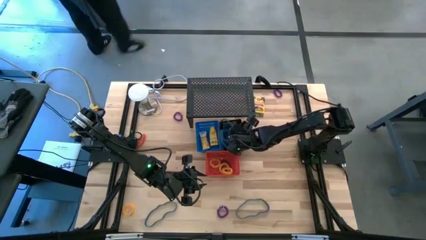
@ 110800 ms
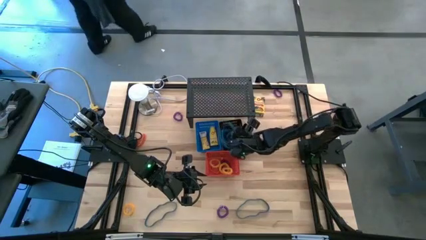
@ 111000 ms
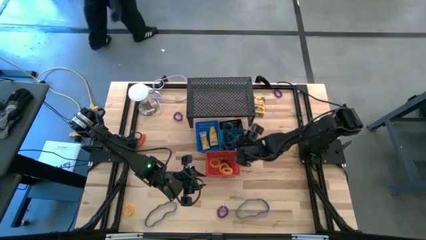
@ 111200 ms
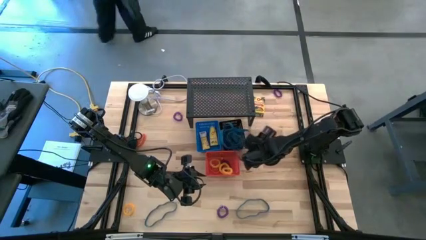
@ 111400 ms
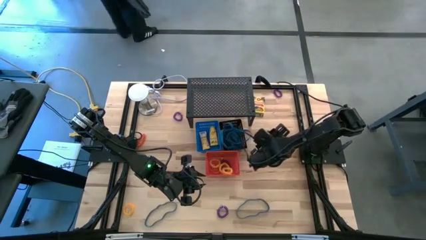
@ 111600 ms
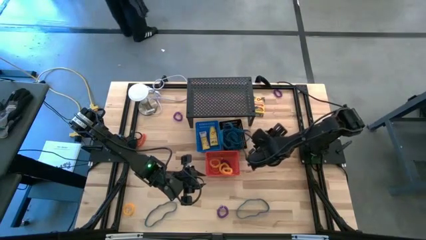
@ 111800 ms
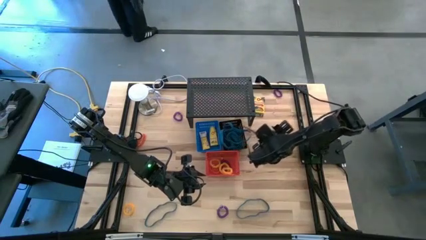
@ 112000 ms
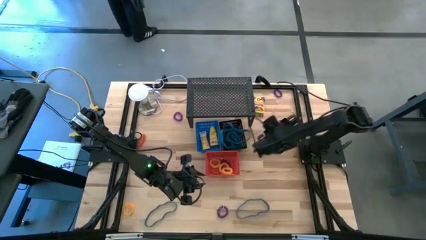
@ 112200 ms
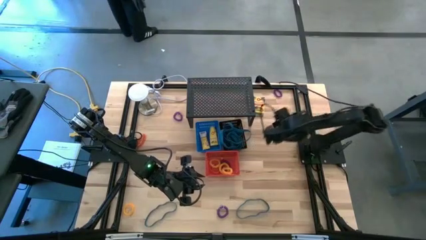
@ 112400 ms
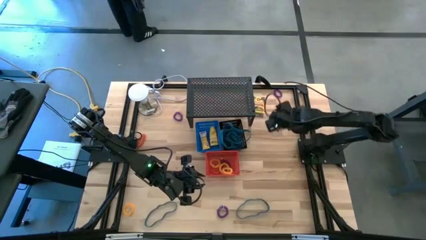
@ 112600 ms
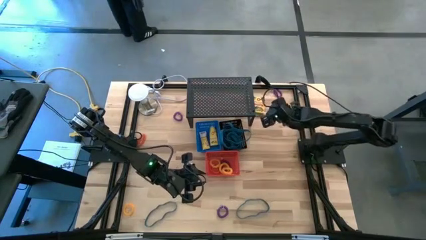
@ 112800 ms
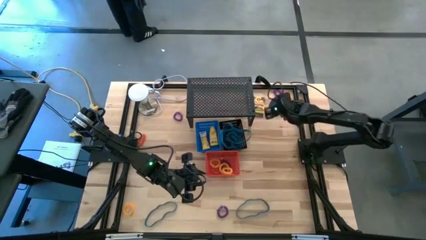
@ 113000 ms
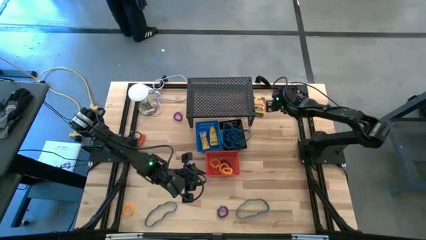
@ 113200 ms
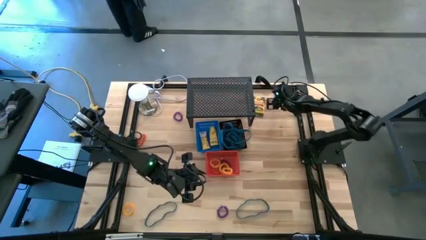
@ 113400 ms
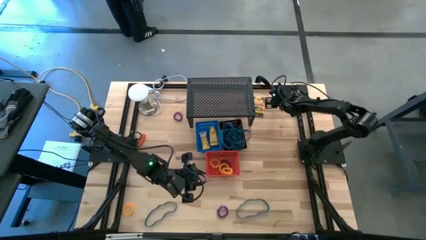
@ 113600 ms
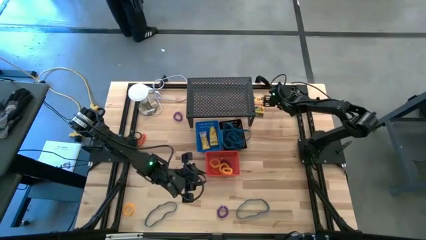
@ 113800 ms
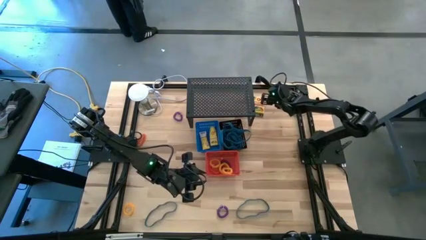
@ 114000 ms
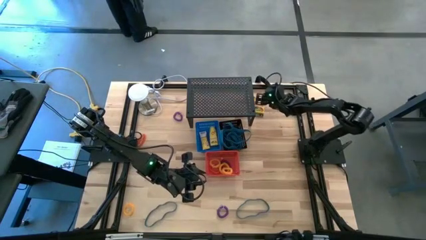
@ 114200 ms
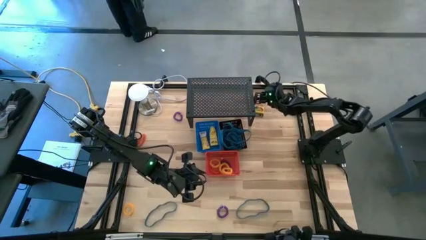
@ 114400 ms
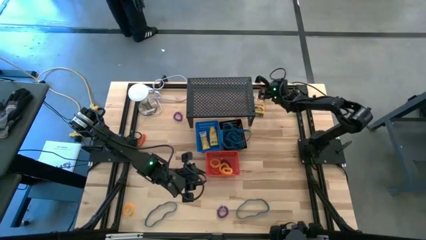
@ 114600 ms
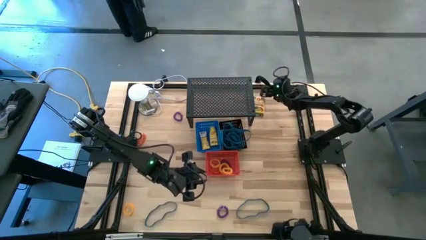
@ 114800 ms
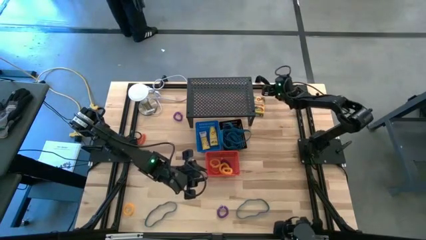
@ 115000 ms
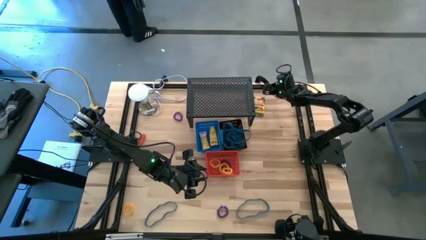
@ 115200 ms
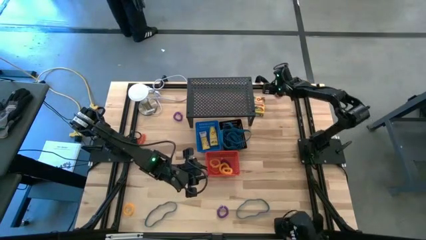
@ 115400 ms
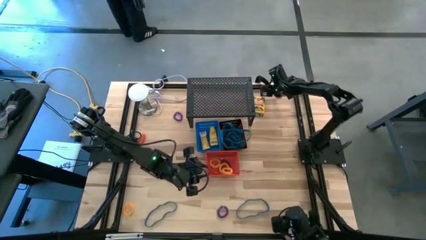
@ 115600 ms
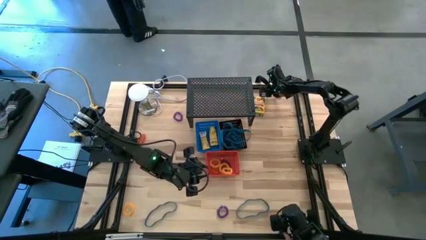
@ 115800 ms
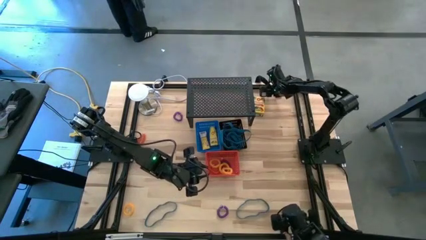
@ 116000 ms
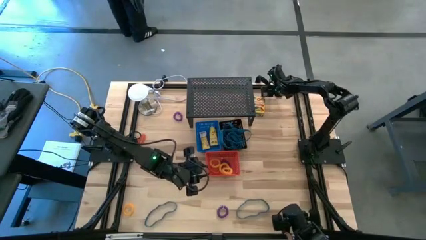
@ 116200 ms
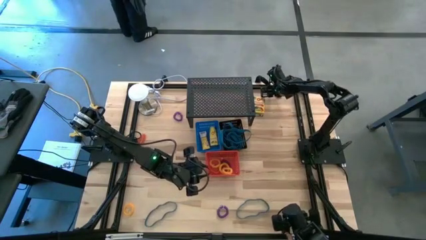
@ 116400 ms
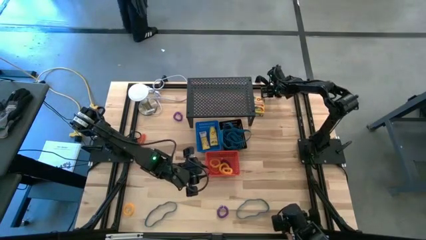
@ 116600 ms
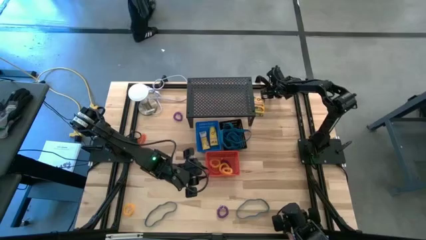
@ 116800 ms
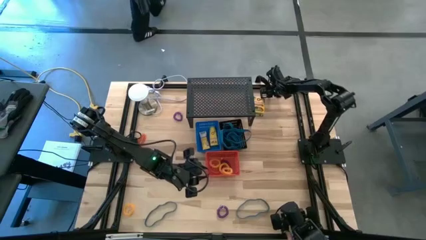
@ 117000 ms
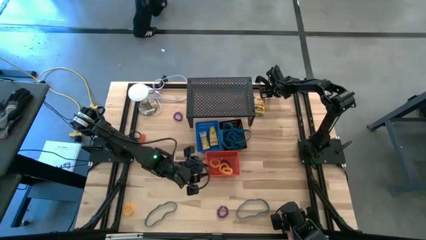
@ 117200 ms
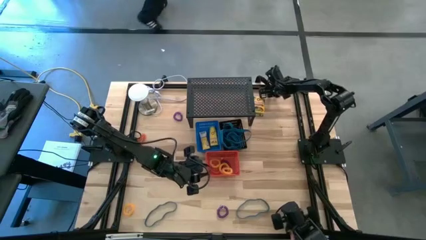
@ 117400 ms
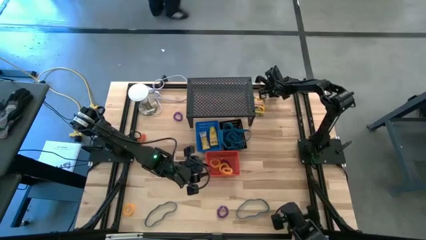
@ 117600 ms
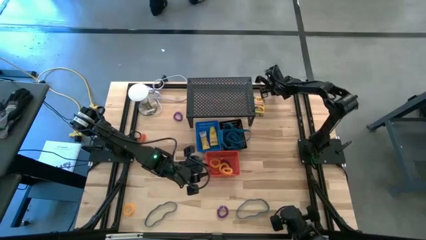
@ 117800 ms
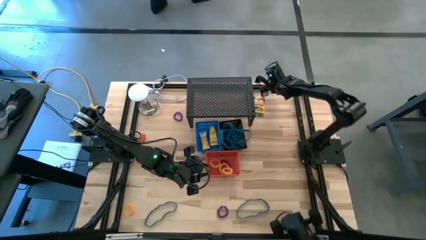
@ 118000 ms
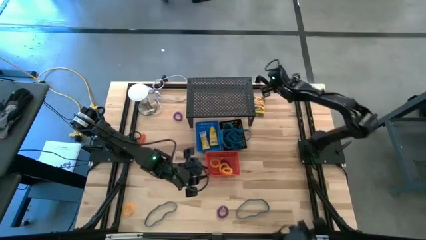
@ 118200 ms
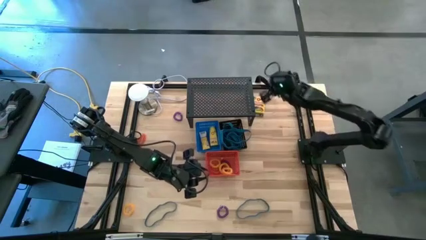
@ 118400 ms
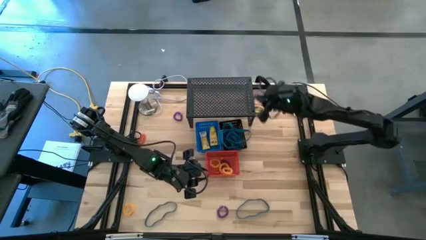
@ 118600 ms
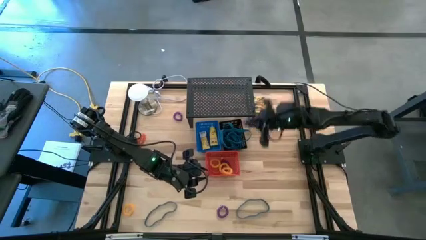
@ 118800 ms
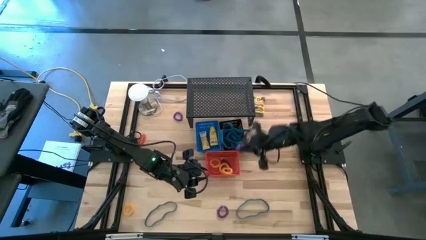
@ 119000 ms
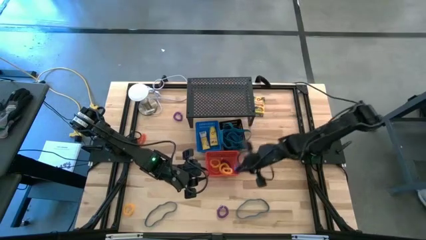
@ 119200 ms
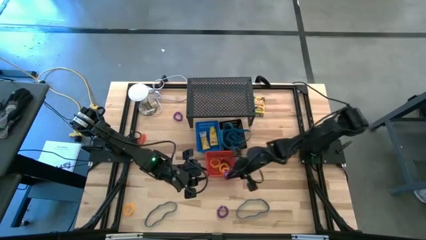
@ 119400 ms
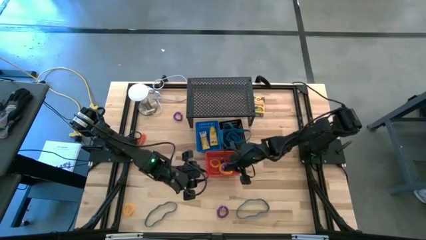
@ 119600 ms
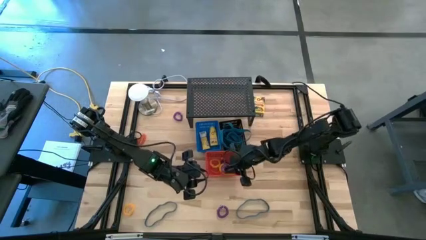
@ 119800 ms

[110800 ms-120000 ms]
Task: Pick & Place Office Desk Supplies
Put the violet spring keychain into the red bin

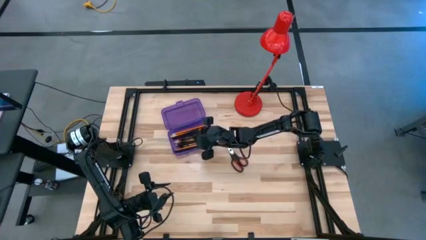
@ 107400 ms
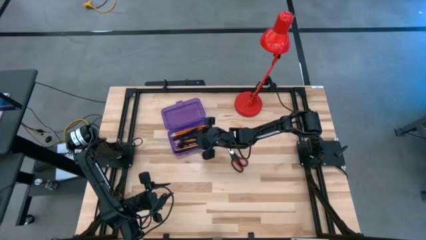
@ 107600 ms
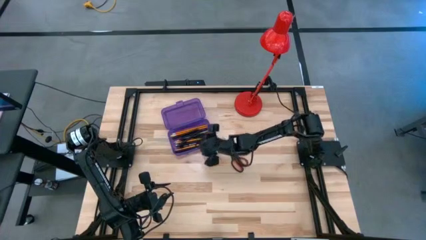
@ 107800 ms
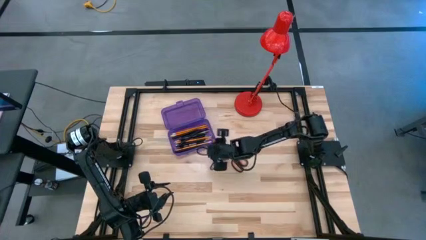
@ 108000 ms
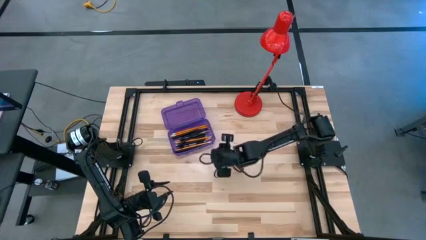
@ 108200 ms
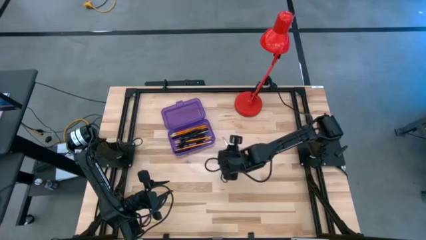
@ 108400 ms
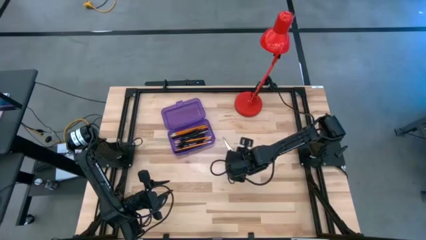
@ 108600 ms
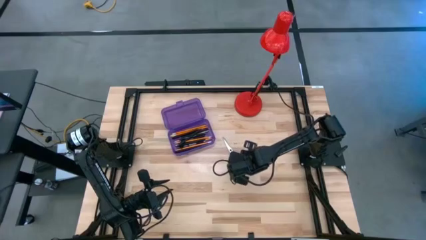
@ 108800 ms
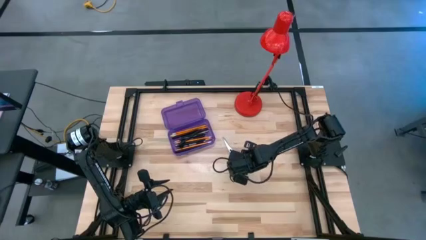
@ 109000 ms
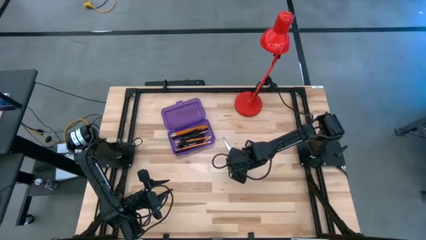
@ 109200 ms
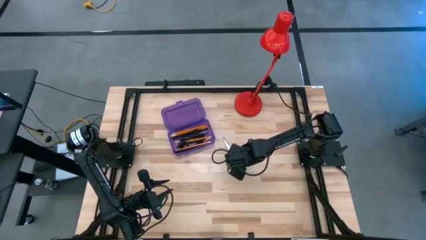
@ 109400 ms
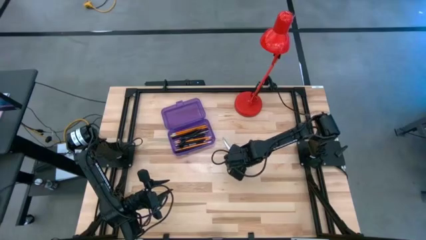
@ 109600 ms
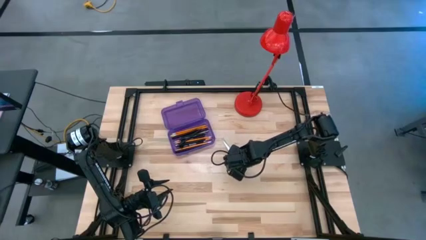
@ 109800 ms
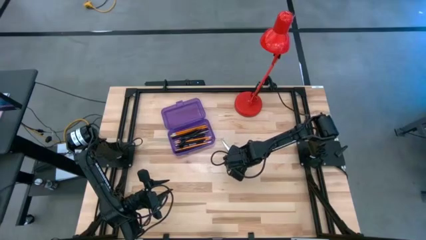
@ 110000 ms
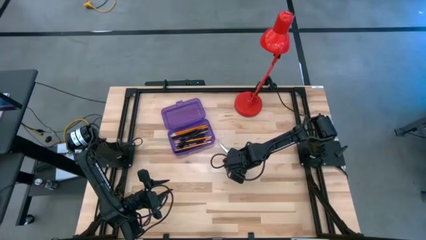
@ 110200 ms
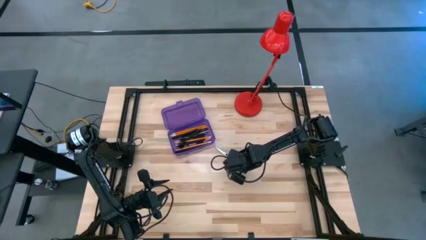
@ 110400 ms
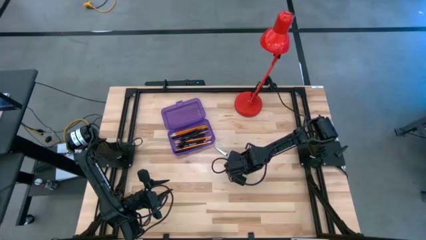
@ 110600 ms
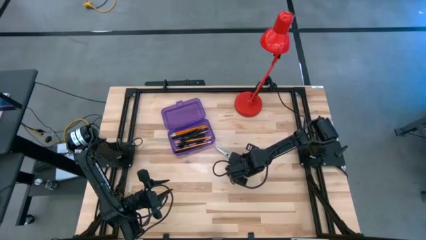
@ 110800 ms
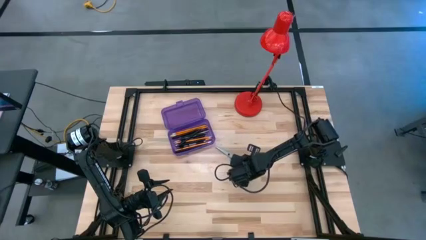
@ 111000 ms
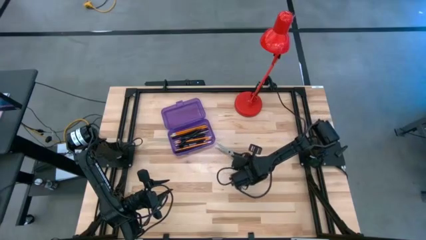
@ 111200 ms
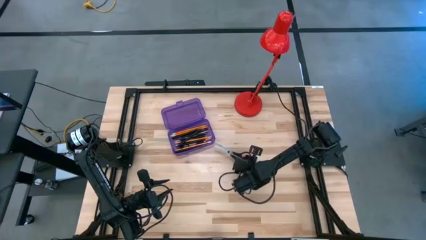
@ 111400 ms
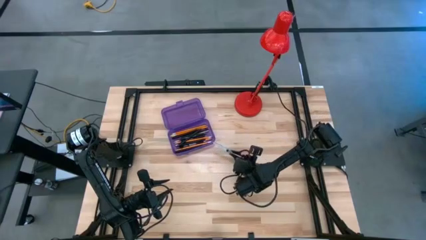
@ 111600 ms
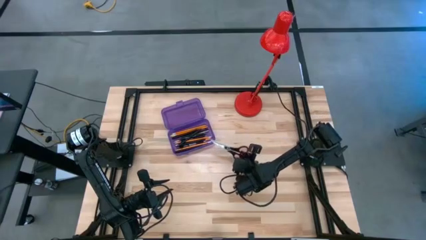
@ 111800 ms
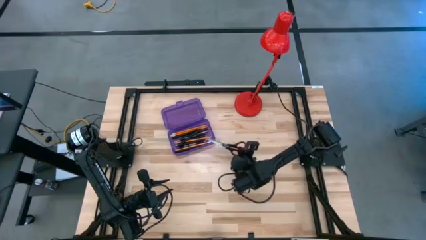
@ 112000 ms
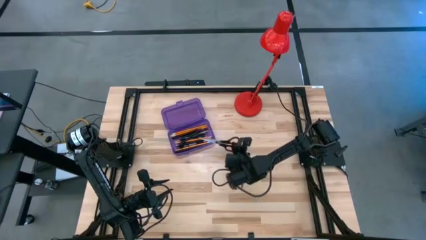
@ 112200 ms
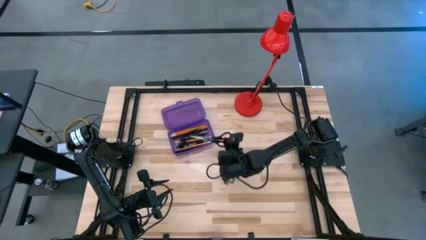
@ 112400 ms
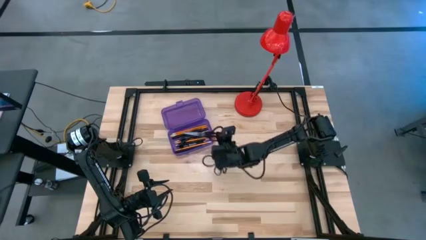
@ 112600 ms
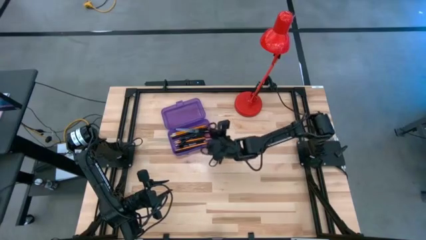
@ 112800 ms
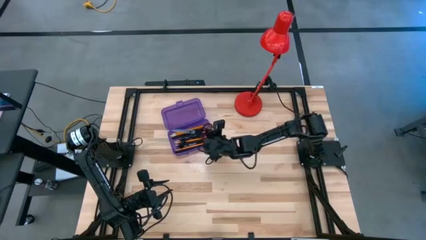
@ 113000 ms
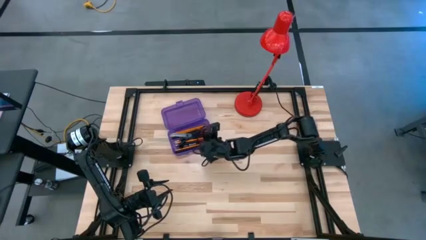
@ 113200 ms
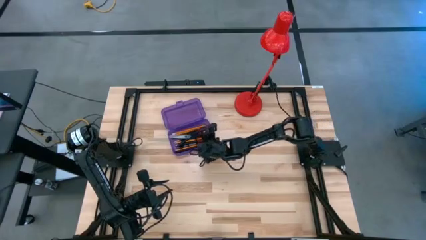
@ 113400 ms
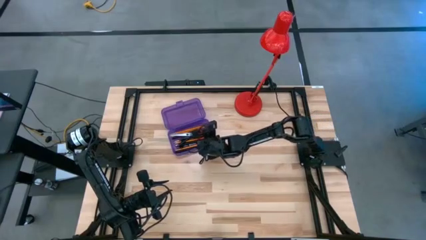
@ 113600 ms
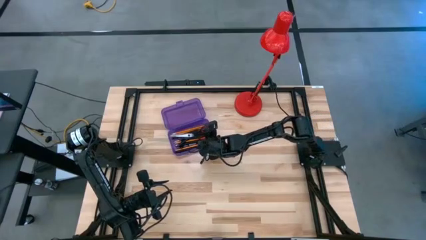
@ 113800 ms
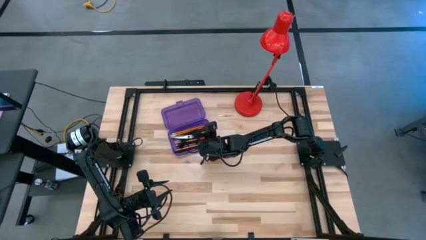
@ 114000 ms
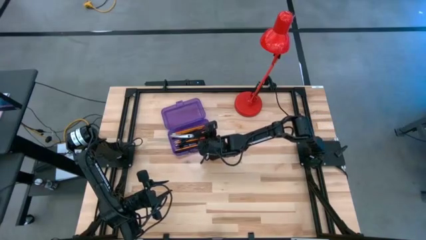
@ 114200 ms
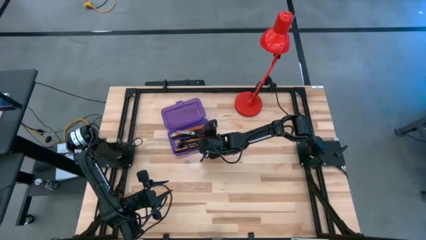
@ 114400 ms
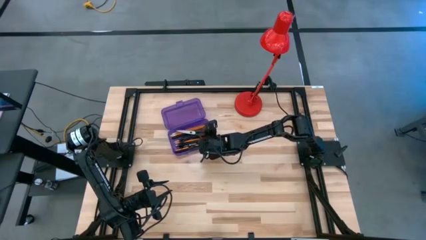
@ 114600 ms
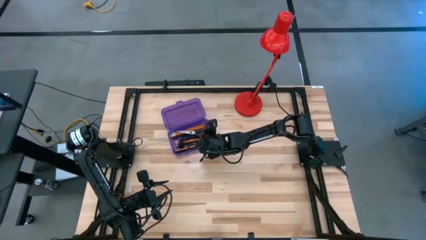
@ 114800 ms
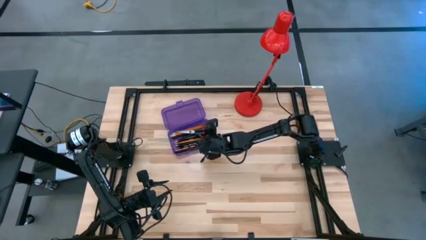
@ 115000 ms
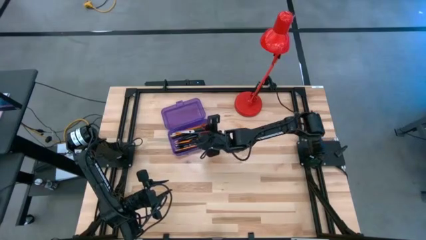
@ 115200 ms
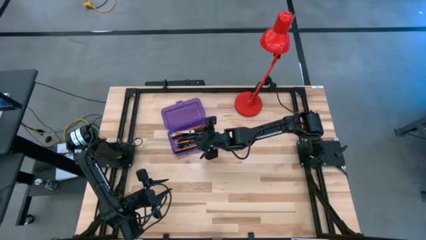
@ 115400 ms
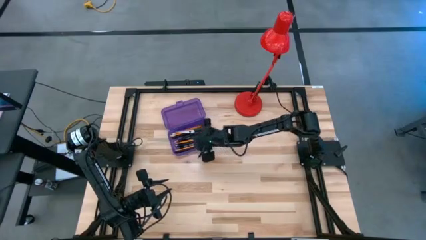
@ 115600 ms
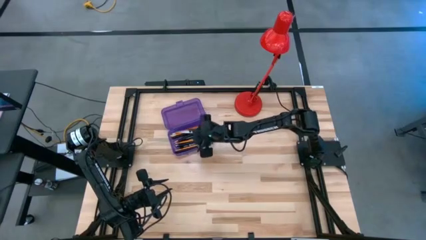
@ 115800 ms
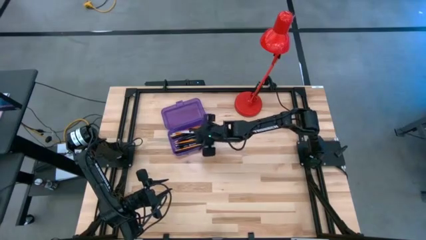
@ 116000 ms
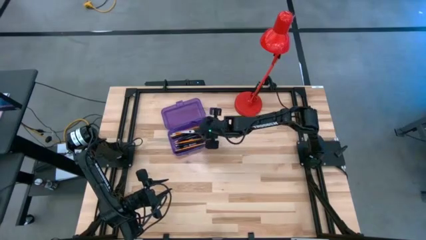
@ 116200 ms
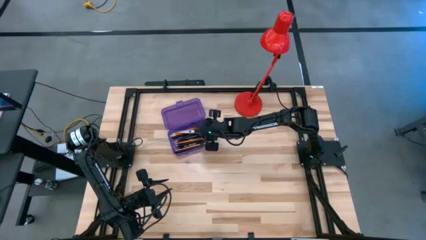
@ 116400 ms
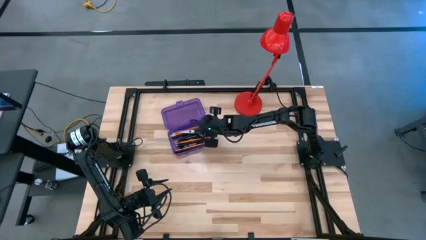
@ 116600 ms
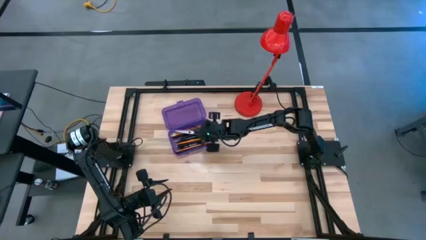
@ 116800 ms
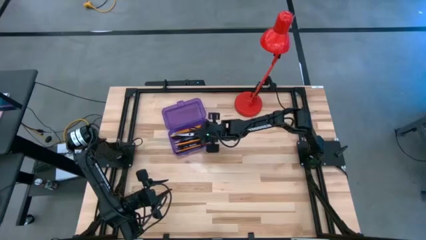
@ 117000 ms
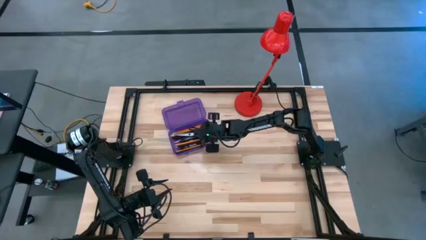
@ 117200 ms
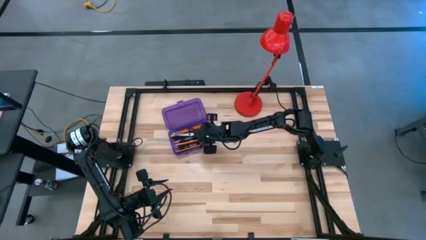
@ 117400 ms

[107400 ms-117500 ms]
Task: Pick & place school supplies into a supply box
Put the black scissors into the purple supply box
